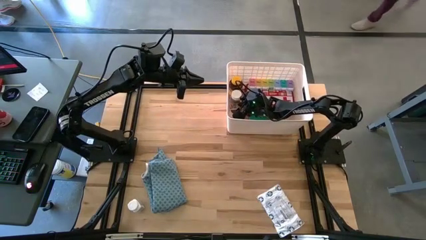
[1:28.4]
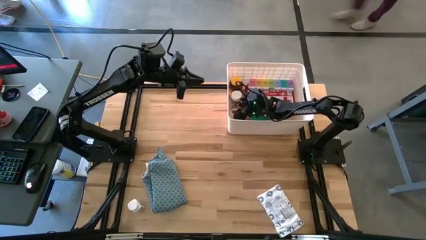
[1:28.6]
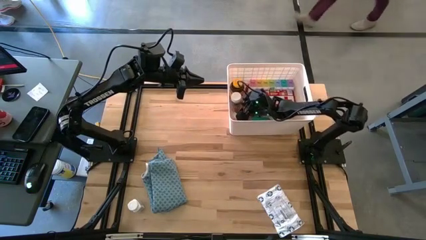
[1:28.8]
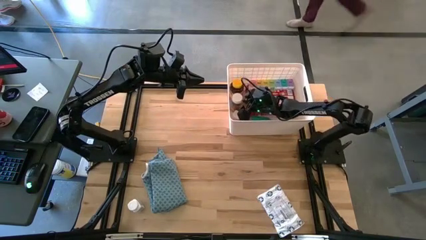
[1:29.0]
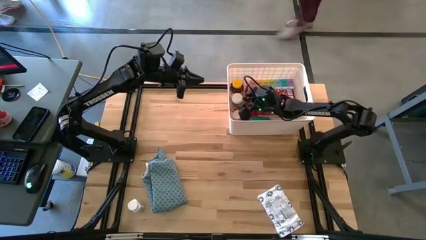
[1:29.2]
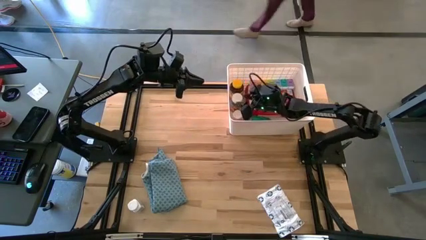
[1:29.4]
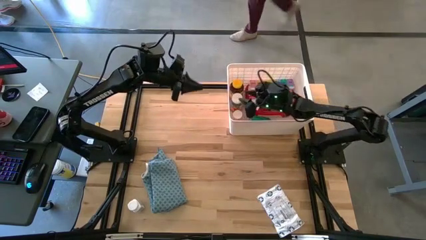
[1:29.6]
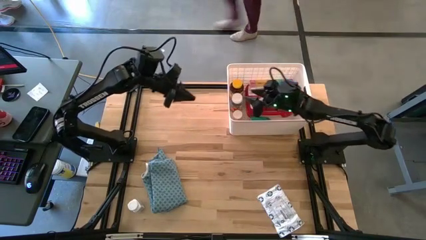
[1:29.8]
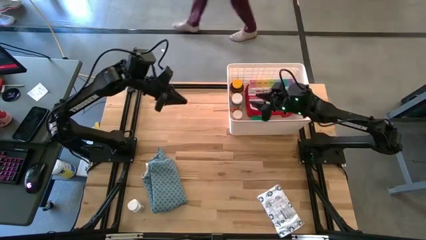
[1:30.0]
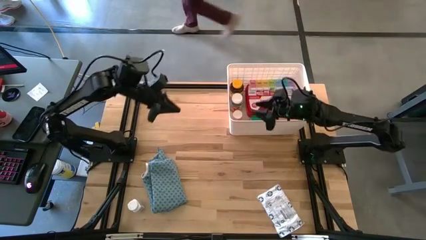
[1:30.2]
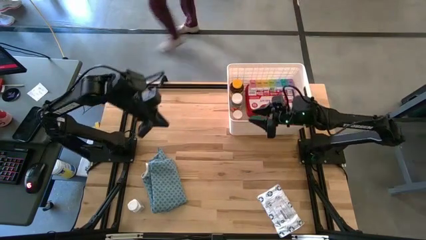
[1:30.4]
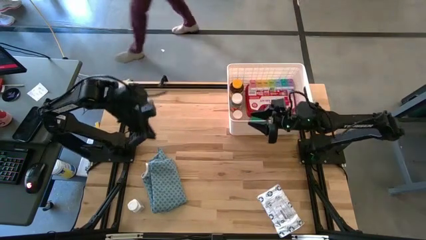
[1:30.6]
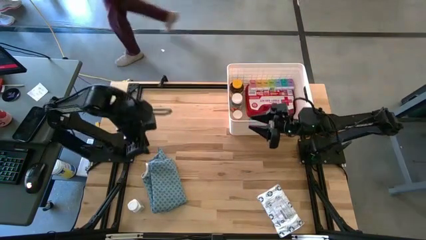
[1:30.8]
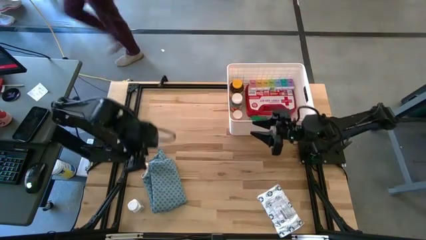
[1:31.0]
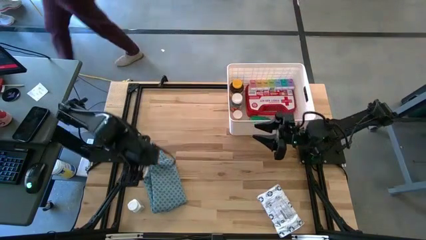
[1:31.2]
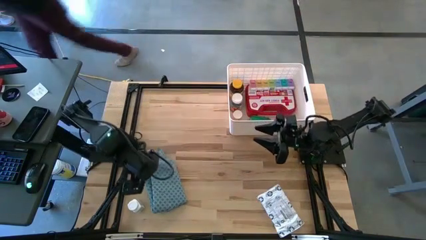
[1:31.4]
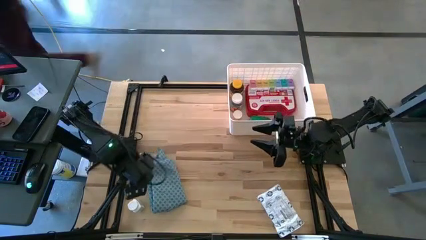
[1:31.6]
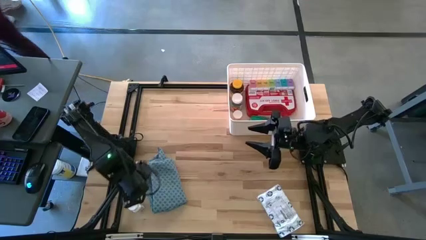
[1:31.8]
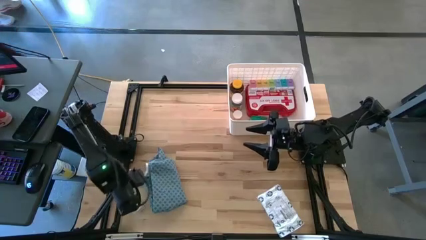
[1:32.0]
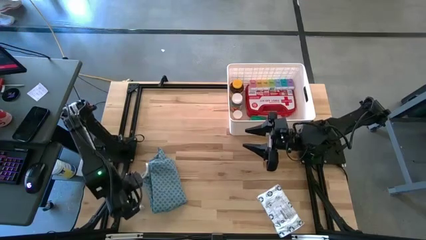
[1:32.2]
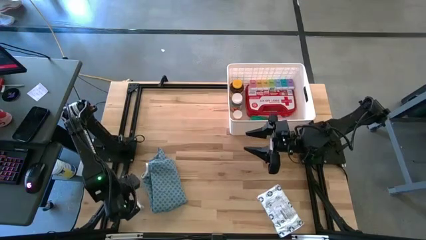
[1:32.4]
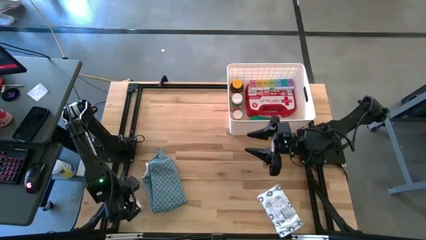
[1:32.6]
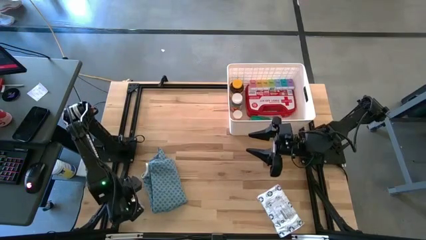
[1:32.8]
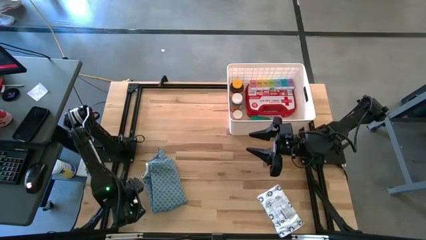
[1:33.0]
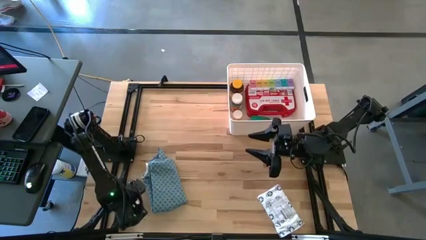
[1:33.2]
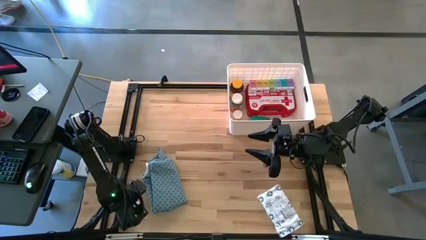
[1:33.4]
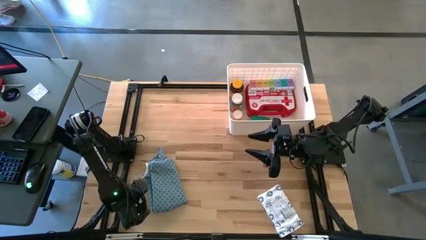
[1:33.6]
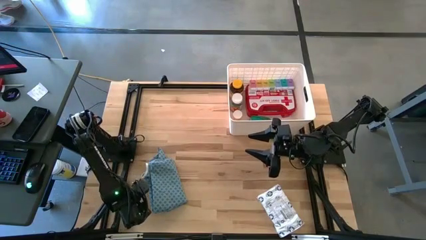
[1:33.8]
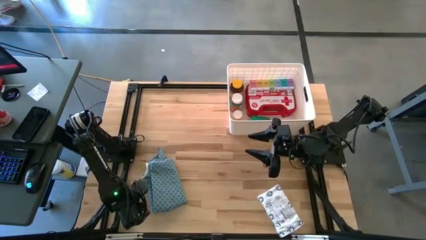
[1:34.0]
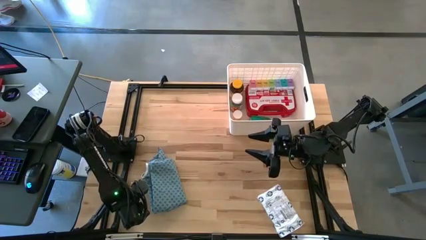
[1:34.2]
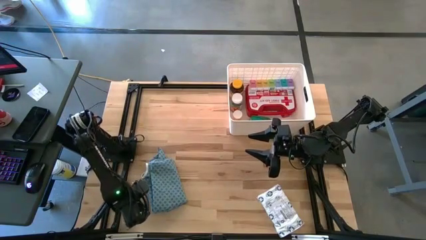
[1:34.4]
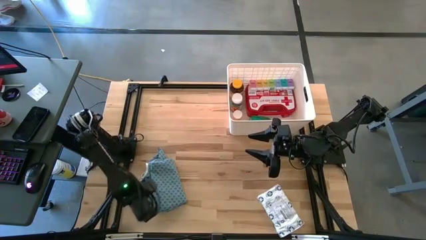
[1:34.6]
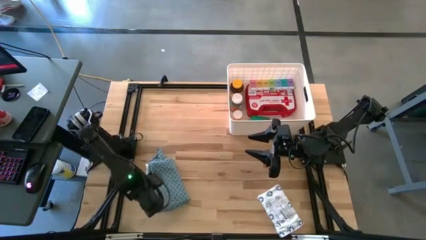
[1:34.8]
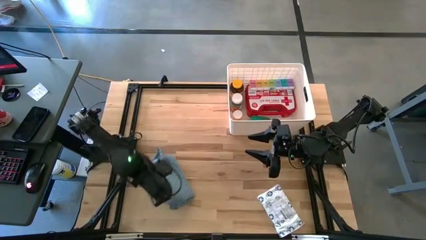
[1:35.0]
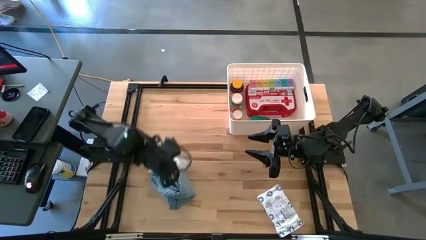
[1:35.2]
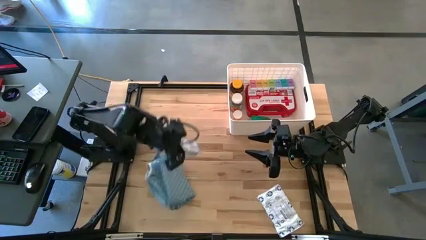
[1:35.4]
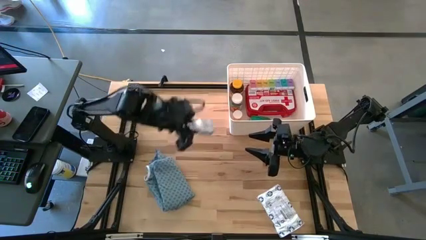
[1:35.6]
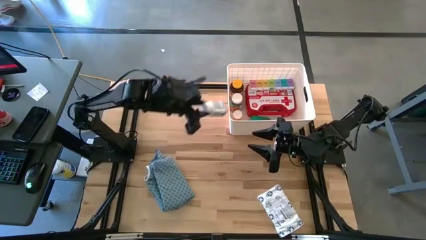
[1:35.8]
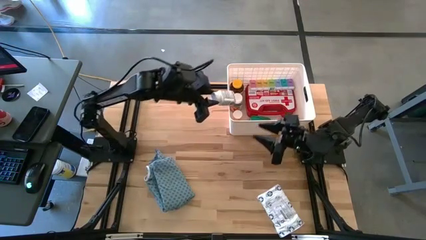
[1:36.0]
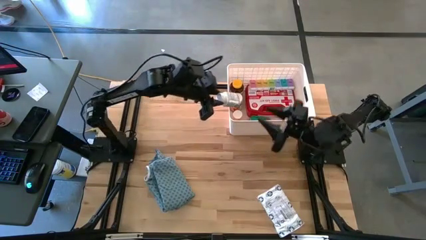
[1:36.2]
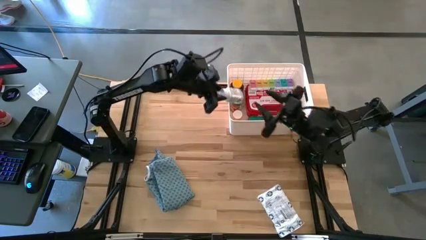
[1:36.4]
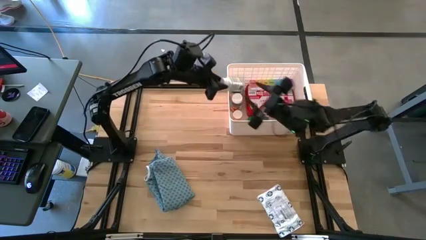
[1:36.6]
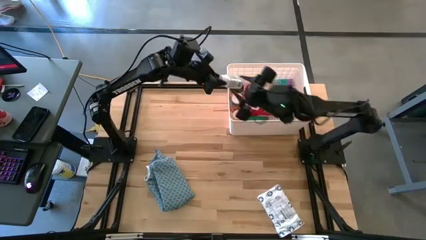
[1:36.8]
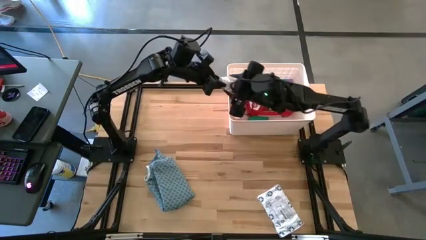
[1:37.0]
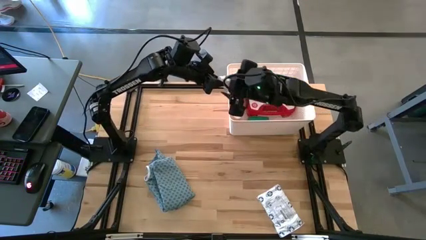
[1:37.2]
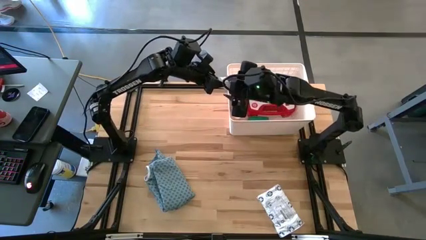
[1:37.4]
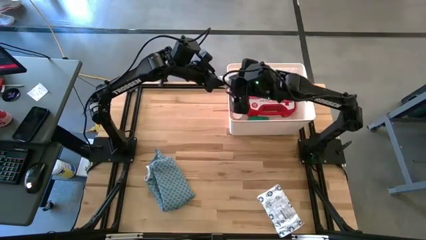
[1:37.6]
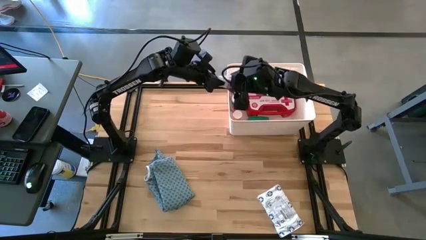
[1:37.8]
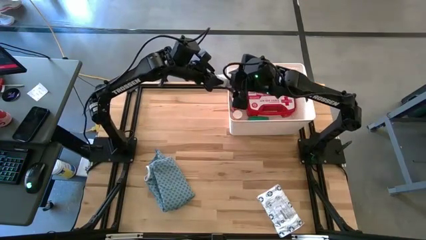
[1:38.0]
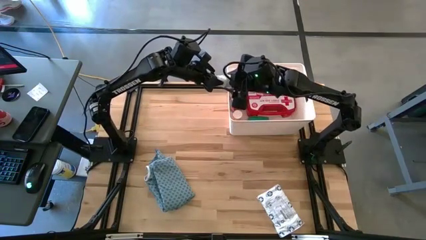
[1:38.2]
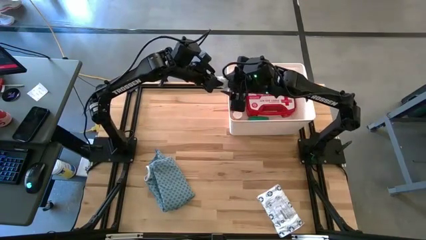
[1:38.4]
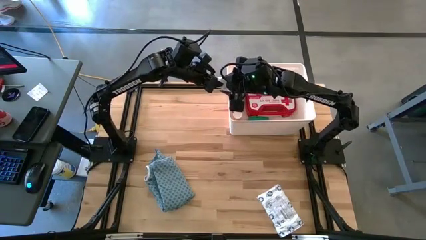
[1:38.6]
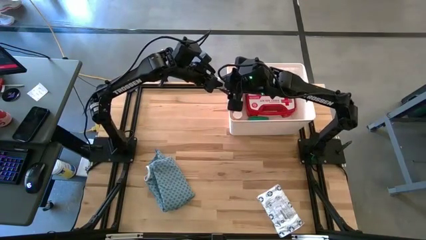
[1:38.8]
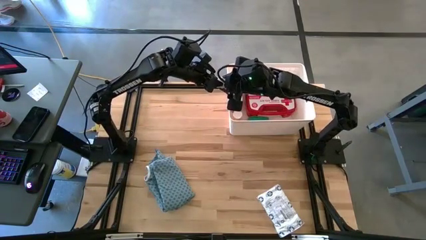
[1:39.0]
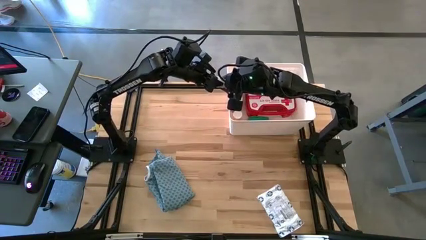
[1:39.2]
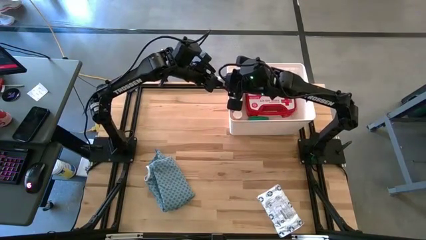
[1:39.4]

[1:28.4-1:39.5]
Task: Pick & place medical supplies in basket/bin
Put the white and blue pill bottle into the white bin
